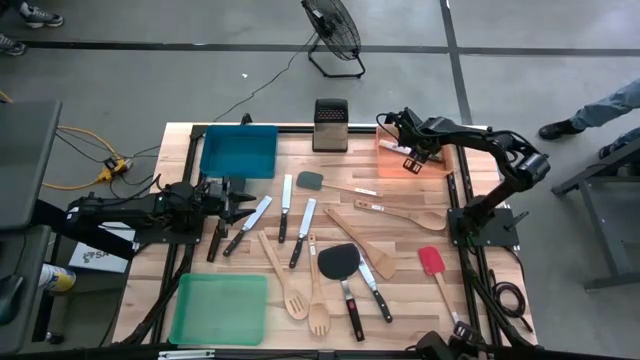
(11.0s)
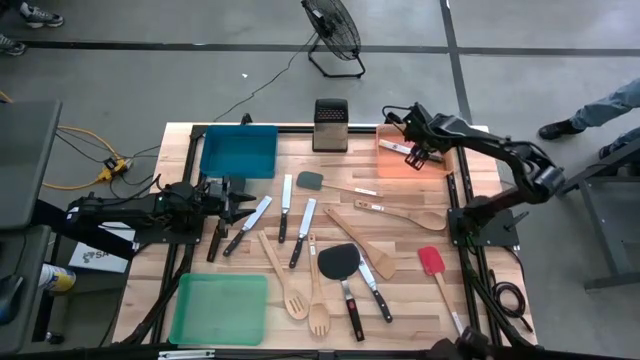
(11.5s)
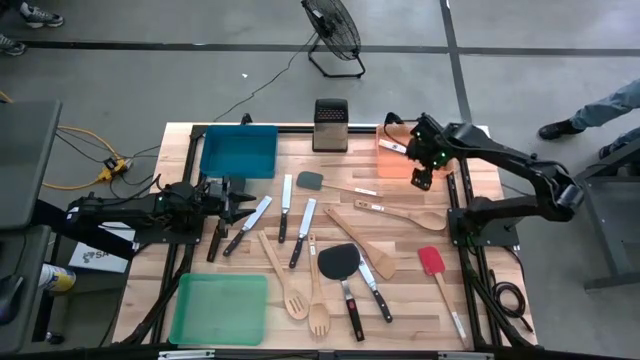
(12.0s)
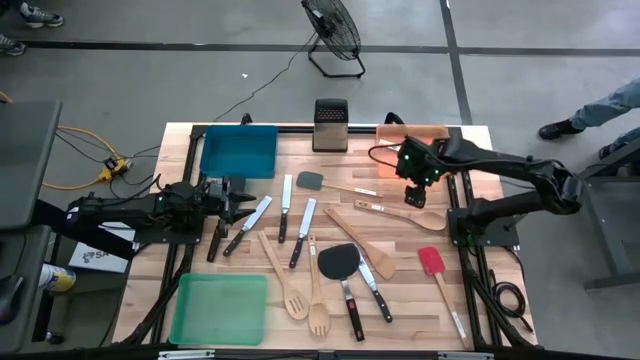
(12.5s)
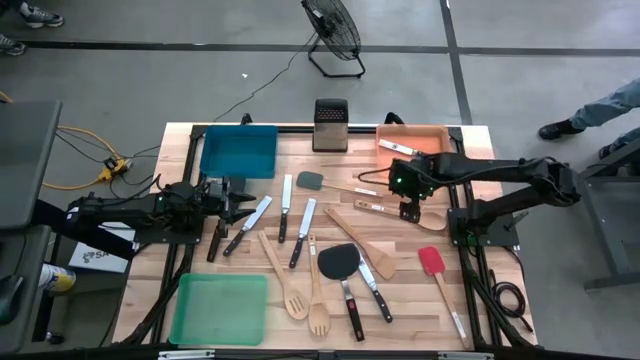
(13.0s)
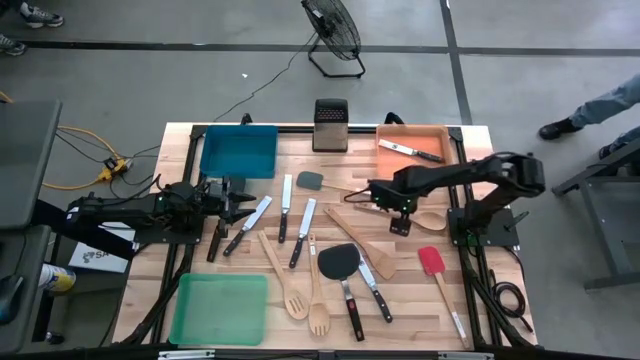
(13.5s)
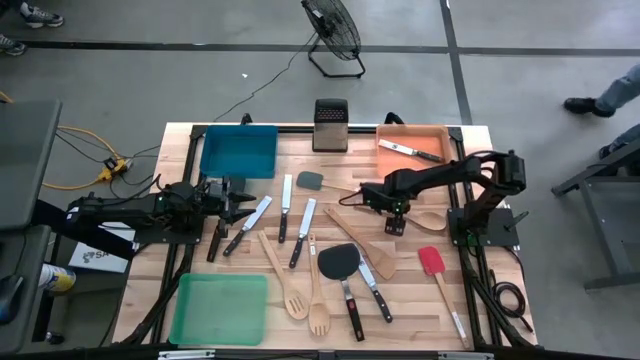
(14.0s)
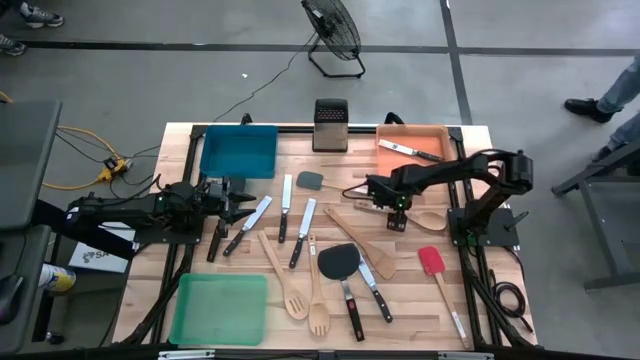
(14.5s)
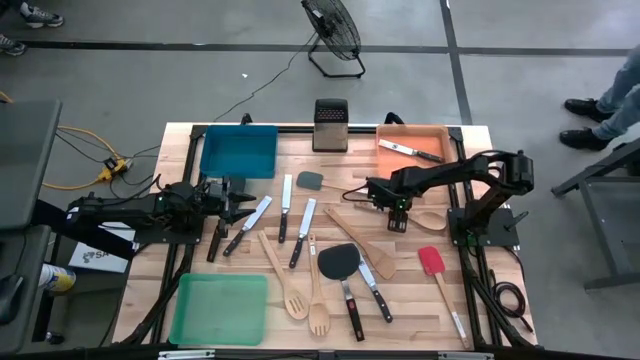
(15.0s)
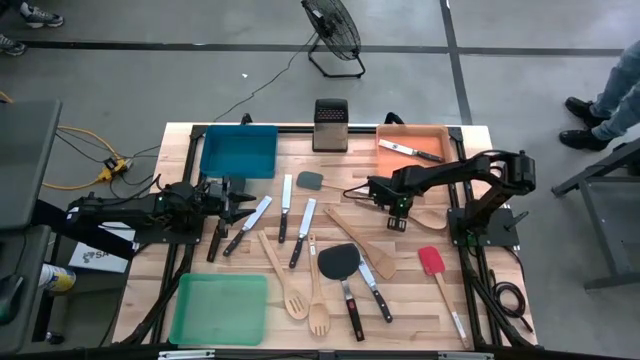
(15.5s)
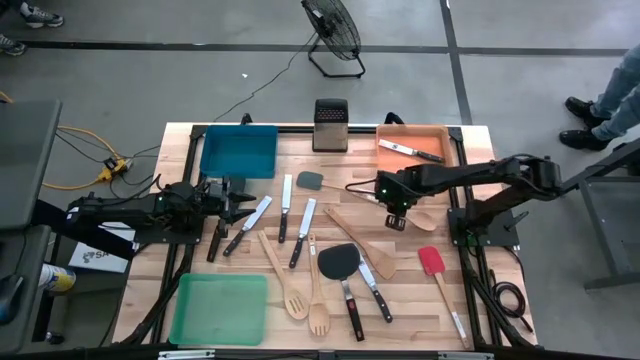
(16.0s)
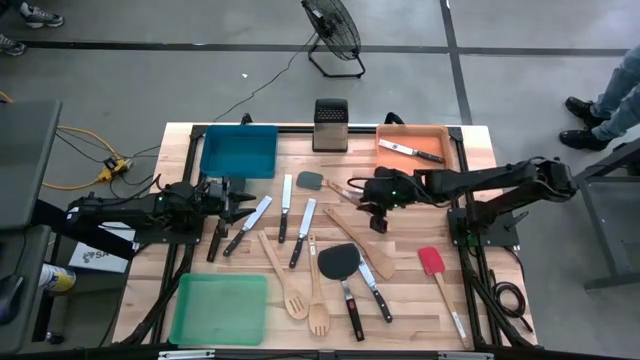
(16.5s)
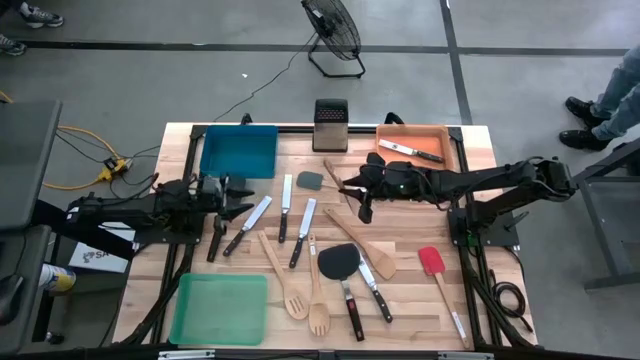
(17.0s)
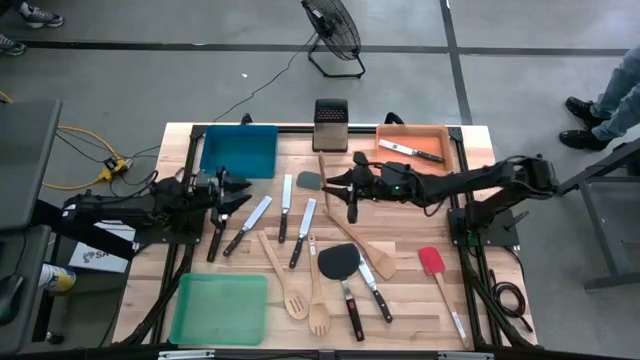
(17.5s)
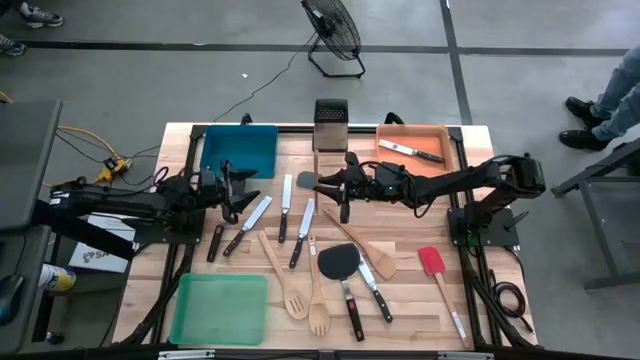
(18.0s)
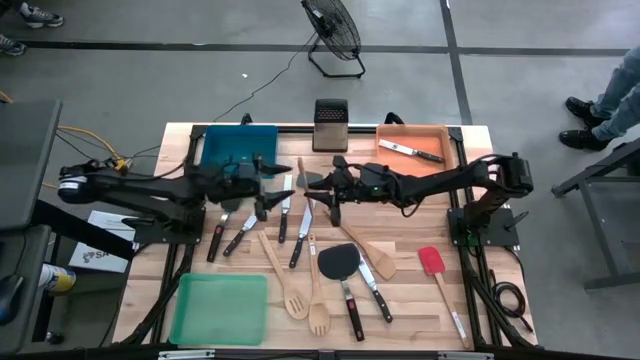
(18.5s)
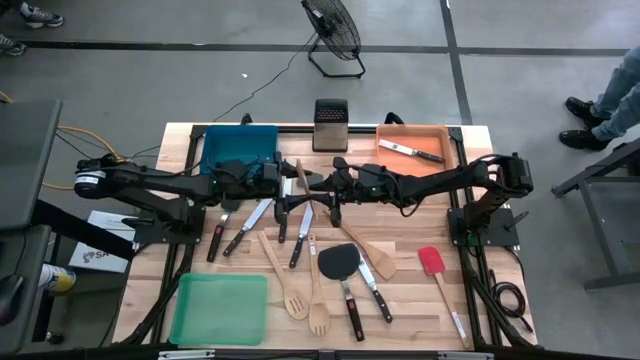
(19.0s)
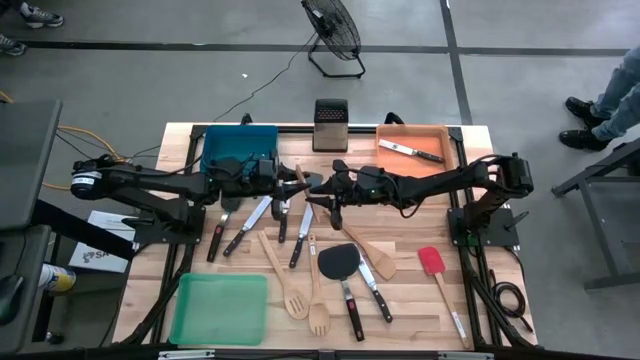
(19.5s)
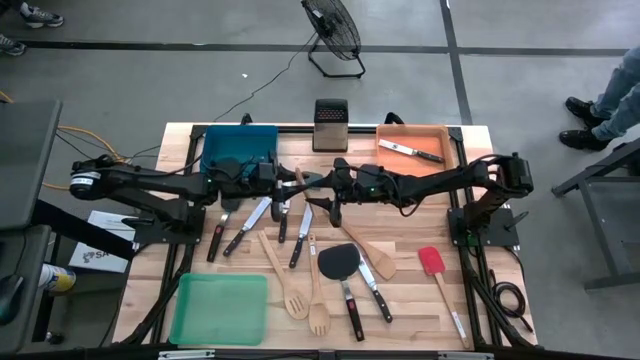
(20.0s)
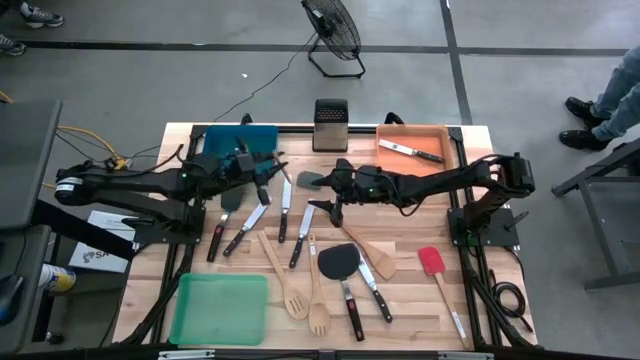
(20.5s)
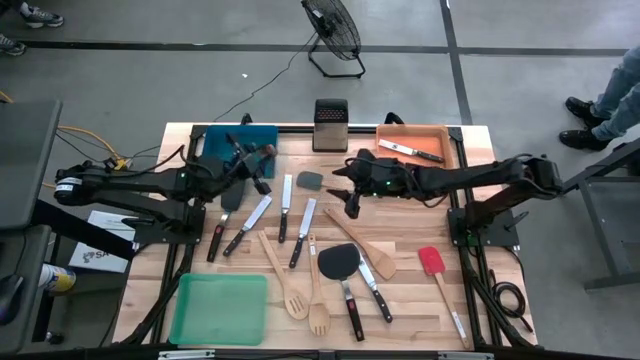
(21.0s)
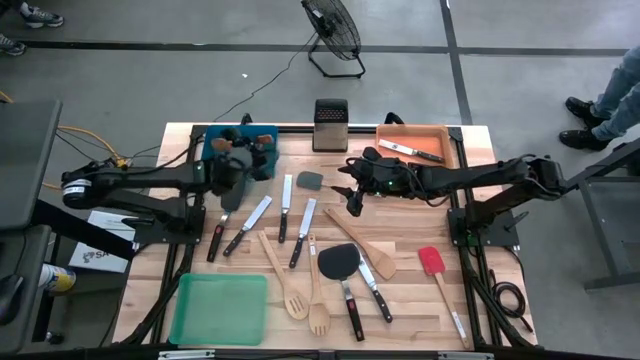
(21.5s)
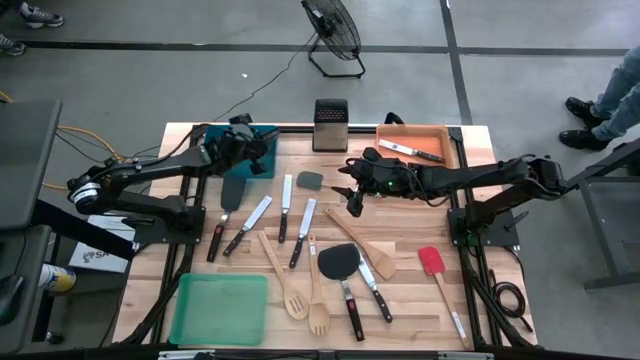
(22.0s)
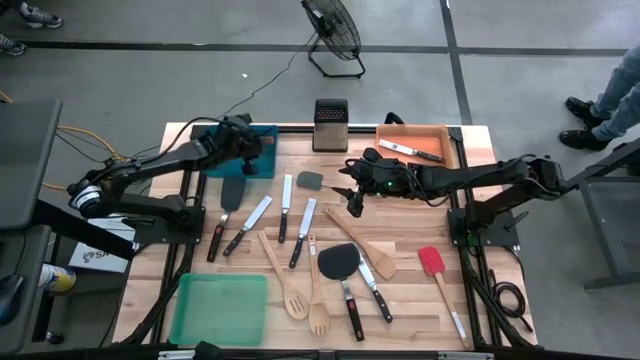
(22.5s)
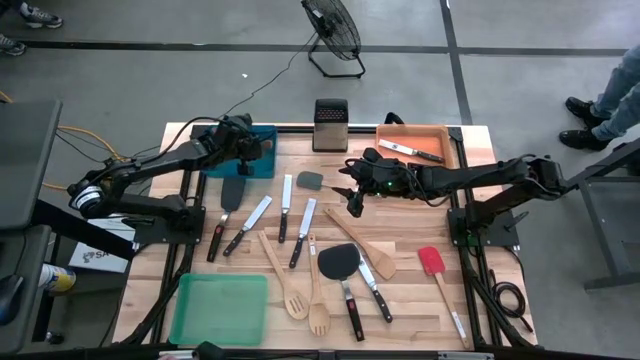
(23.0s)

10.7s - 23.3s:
Task: Pick & Place Kitchen Items
Put the wooden spoon into the blue bin

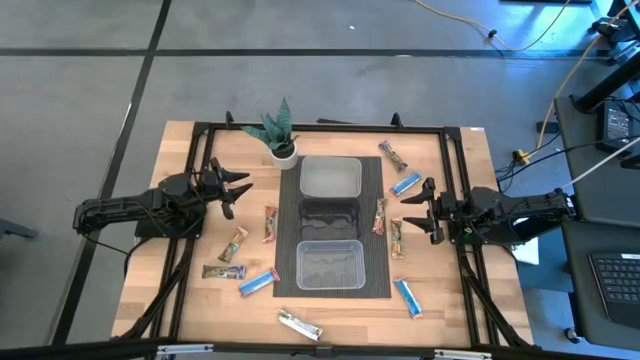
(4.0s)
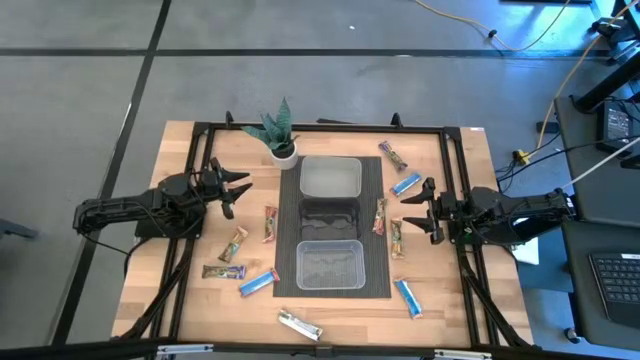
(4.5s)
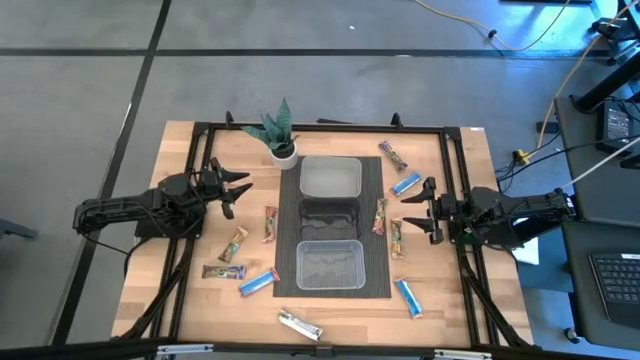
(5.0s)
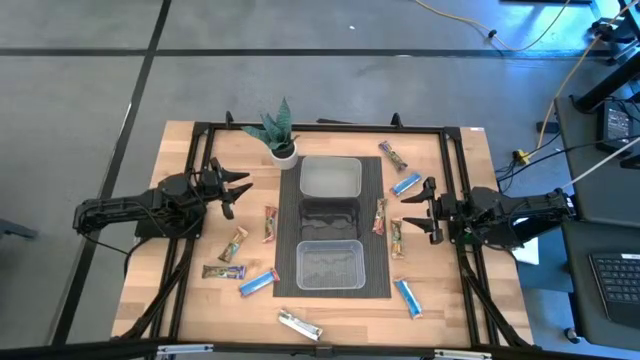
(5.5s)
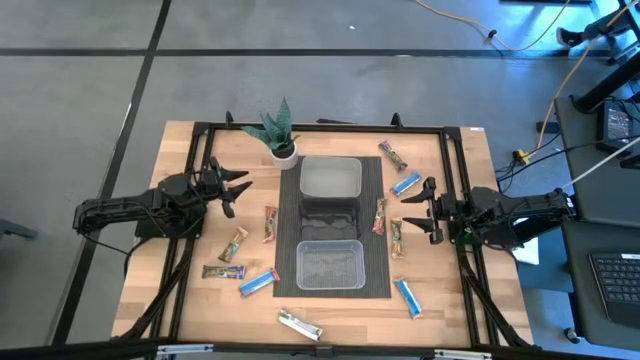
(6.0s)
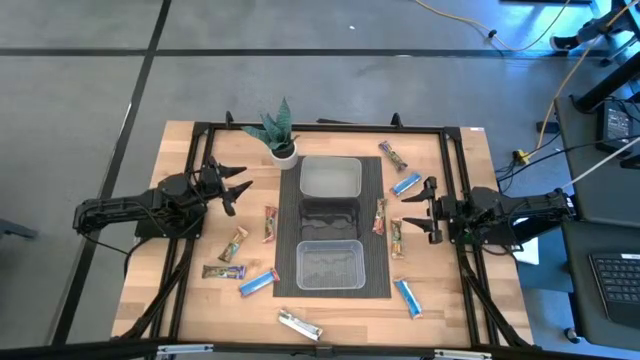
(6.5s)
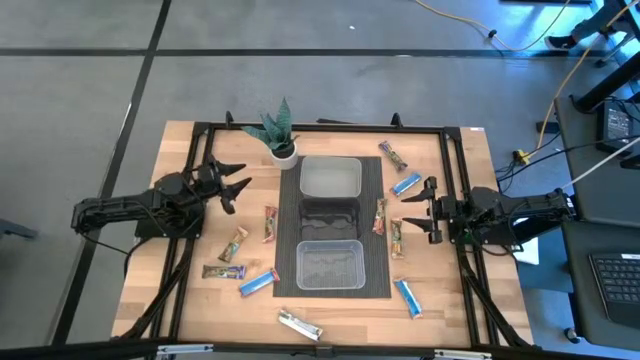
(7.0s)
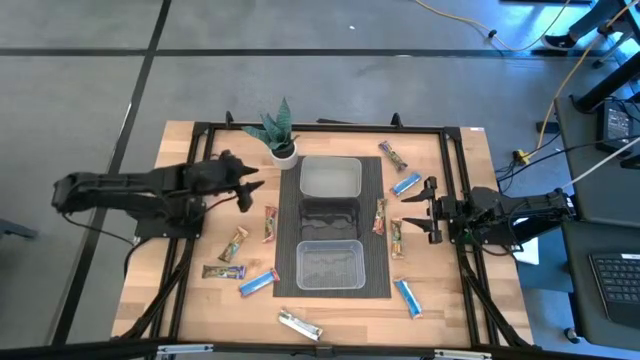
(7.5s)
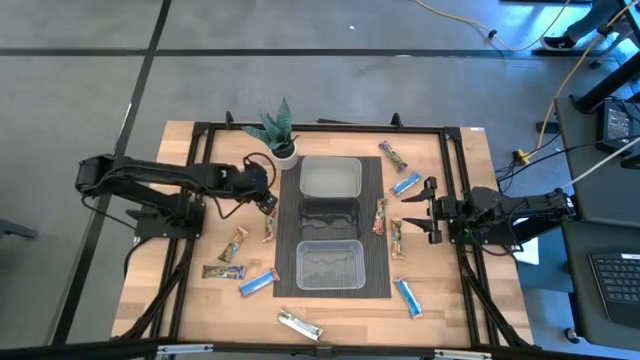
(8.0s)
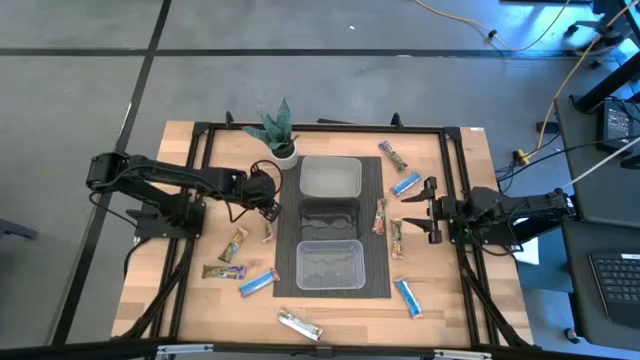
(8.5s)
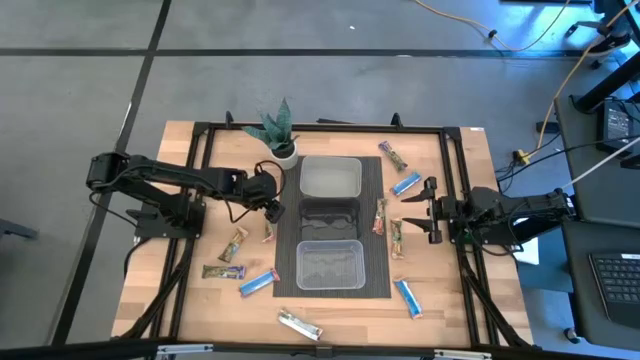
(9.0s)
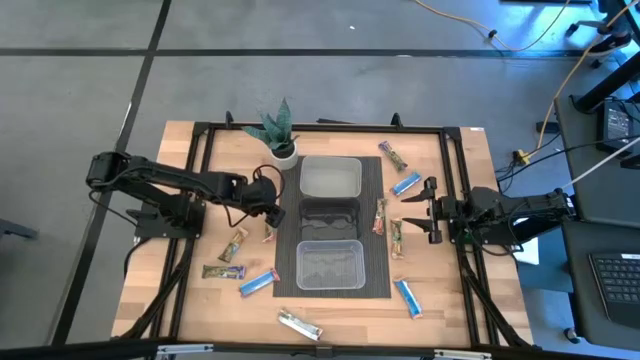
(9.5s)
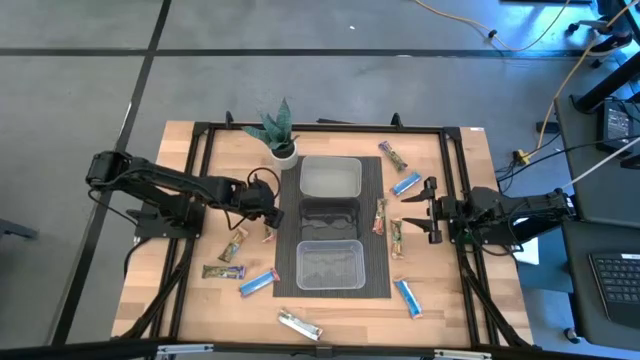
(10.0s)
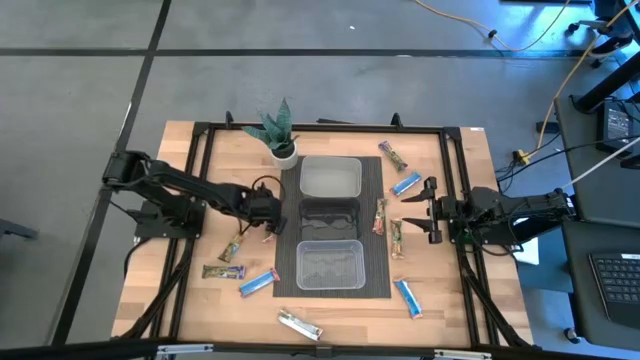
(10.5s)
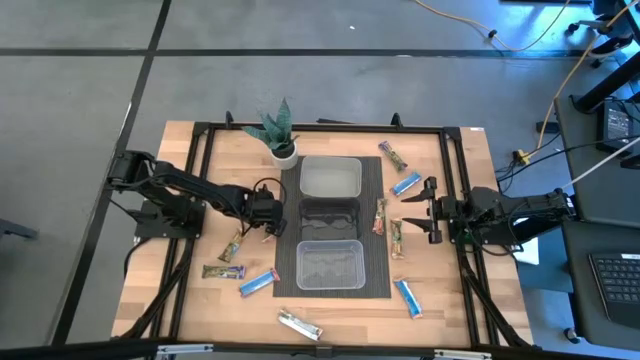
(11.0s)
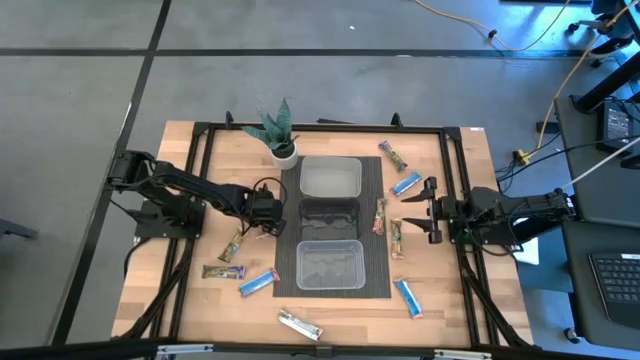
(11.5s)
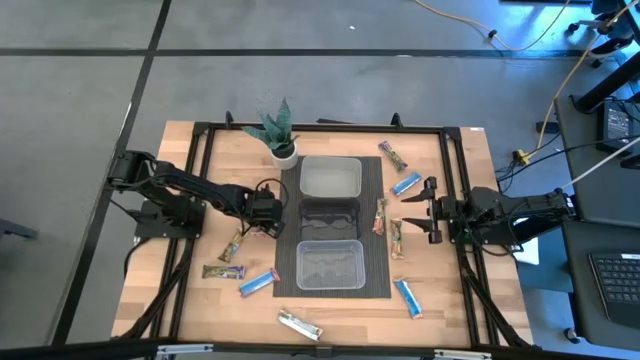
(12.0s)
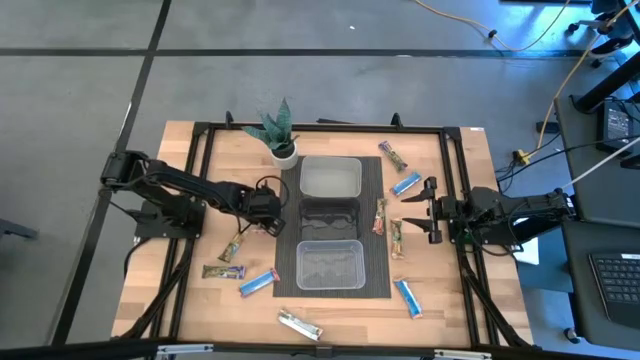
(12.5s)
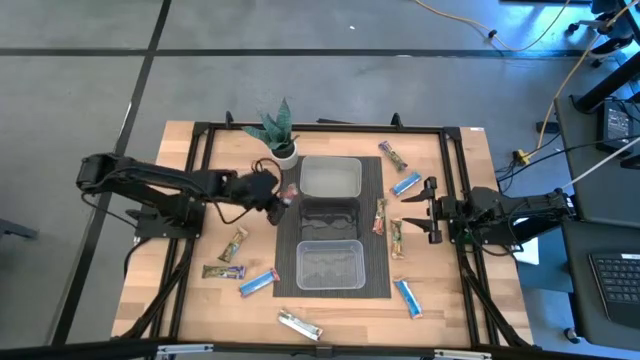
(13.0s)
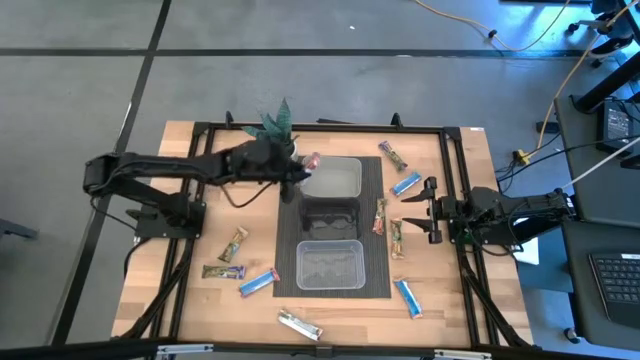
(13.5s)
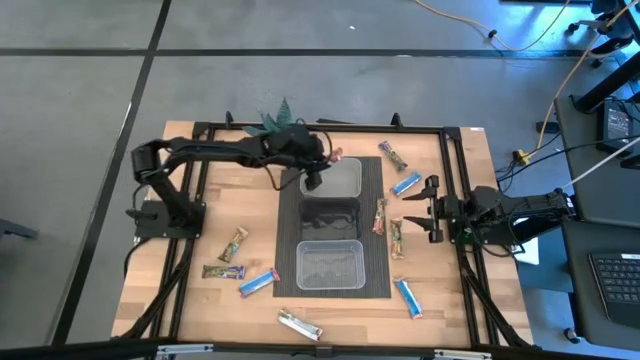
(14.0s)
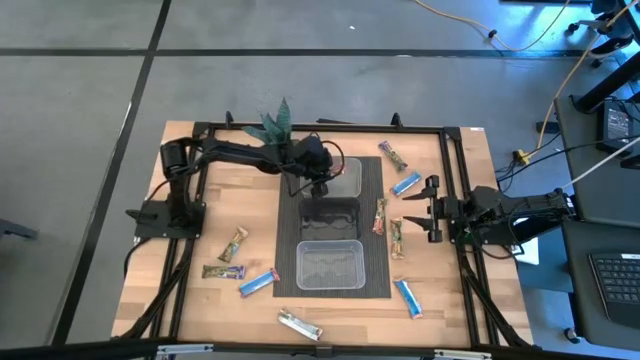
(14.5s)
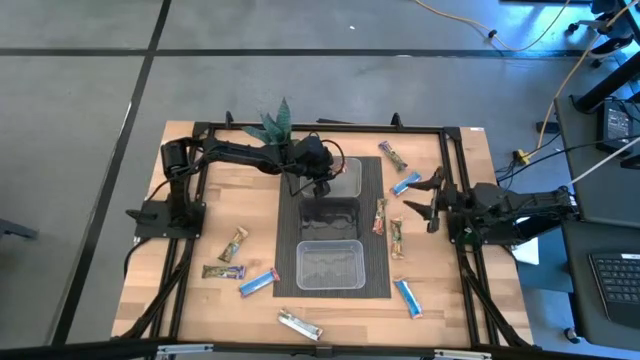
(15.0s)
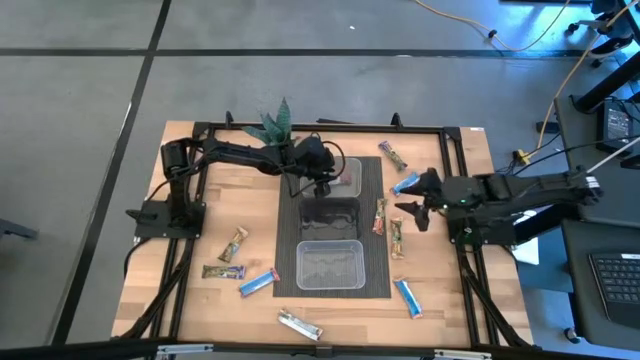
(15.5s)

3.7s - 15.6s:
Task: Pick and place Granola Bars by type
Put the red granola bar into the gray bin
